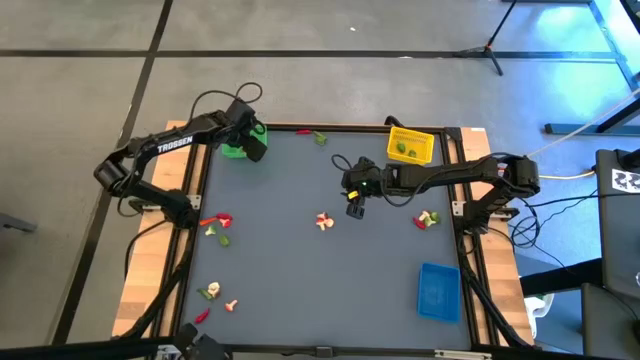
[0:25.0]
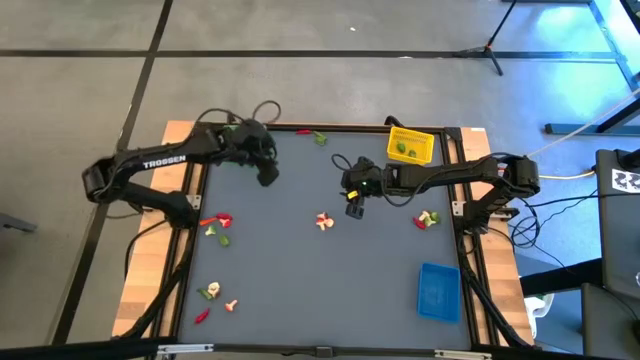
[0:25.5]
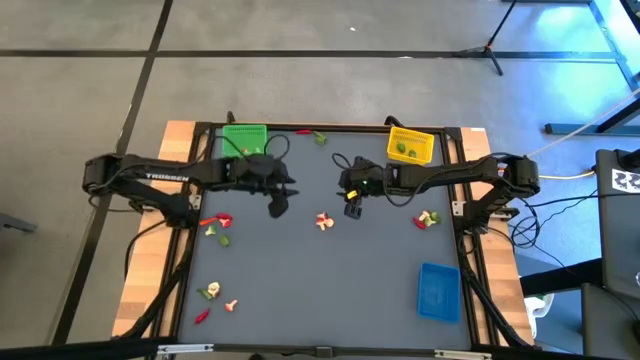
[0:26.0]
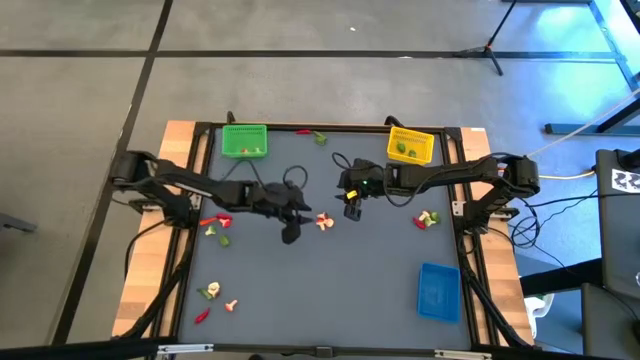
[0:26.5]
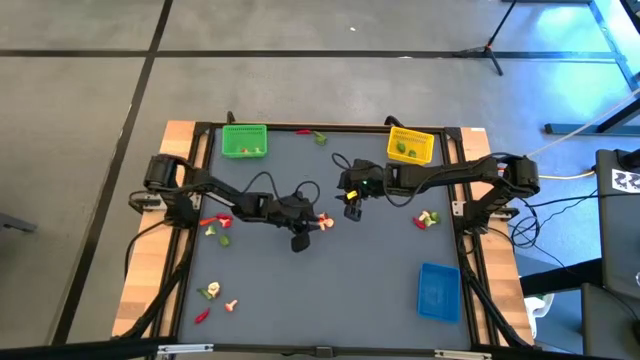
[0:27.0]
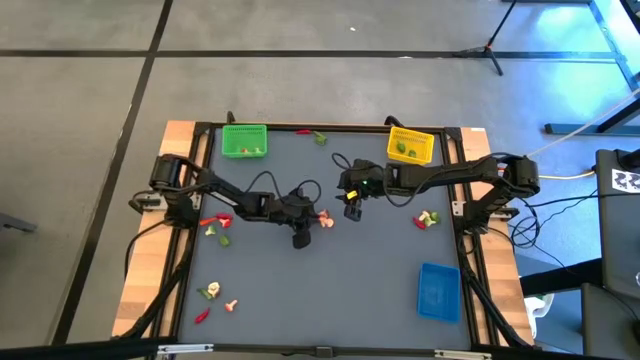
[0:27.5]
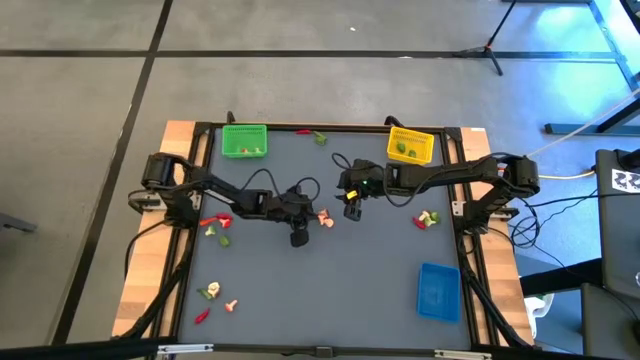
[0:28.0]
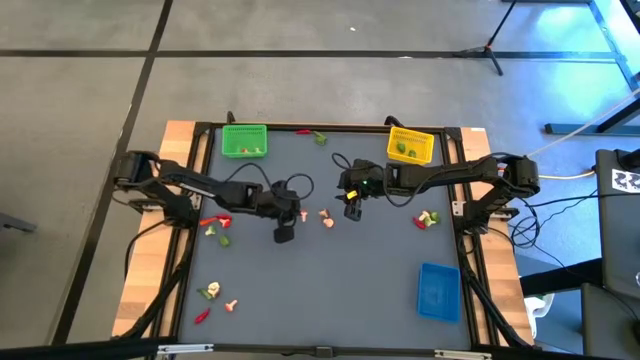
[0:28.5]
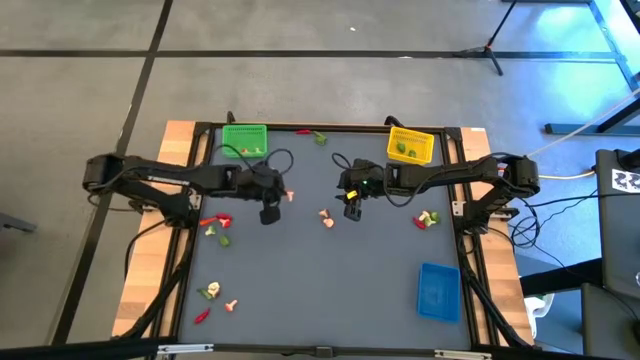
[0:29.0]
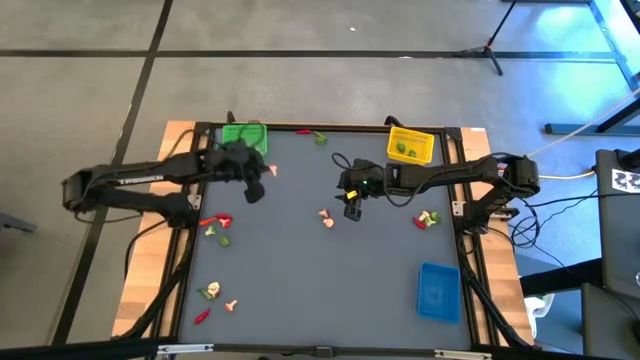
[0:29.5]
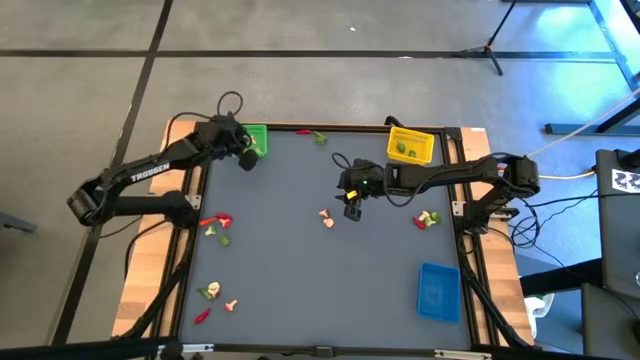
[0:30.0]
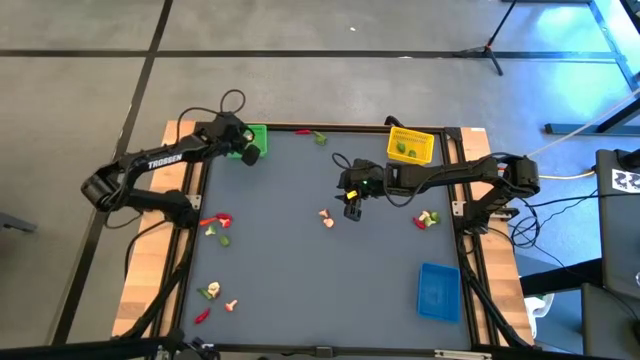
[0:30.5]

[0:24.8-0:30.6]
Task: Sort produce into baskets
Put the red mushroom into the green bin

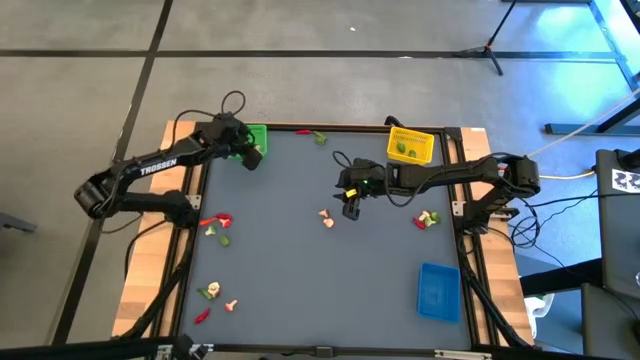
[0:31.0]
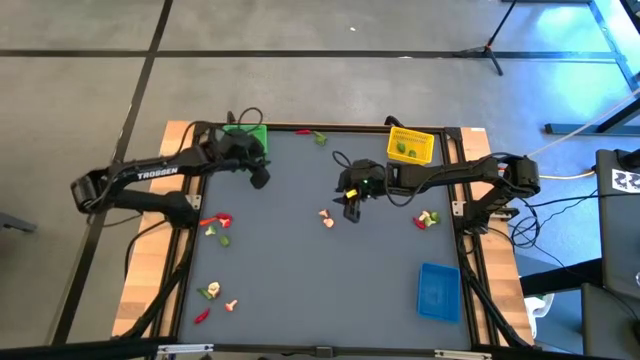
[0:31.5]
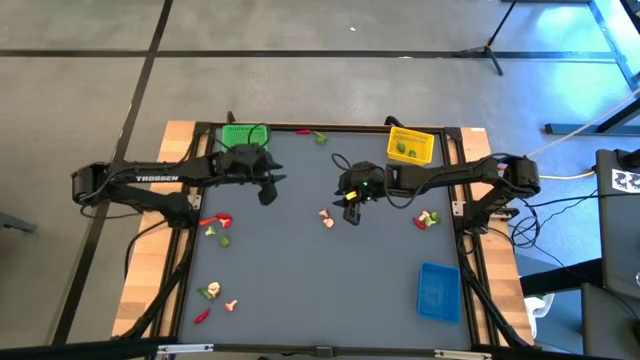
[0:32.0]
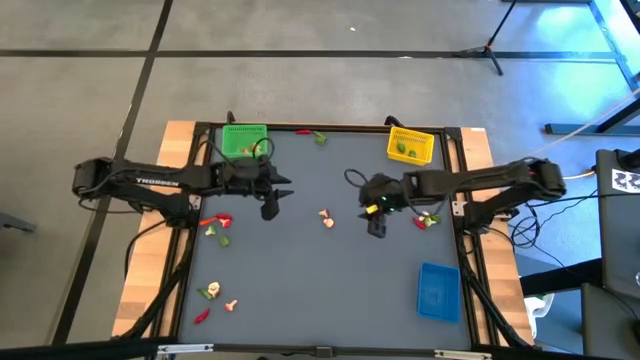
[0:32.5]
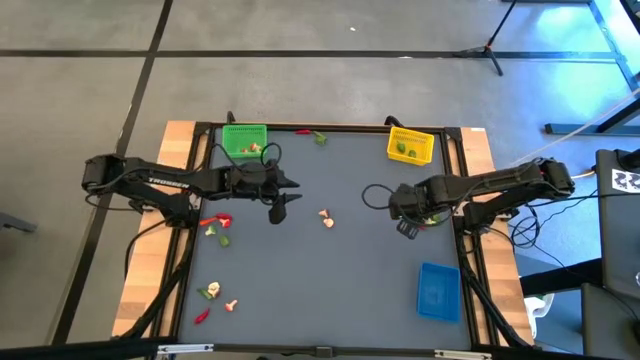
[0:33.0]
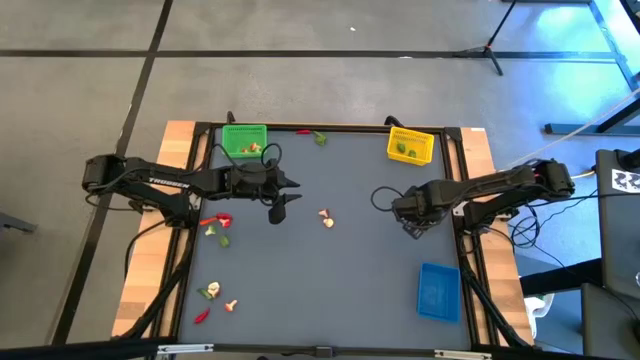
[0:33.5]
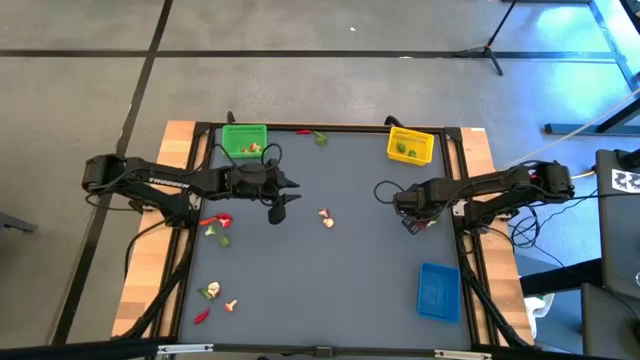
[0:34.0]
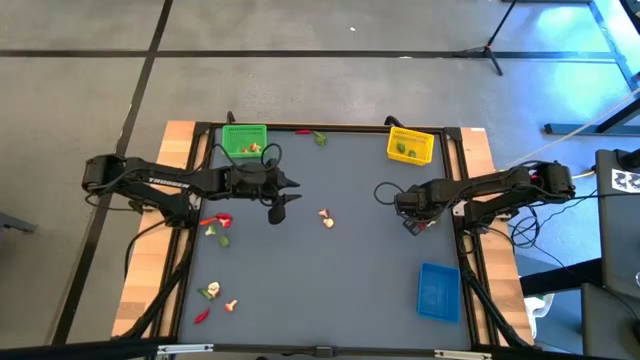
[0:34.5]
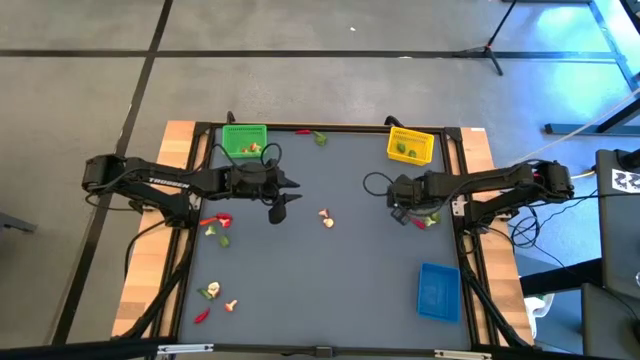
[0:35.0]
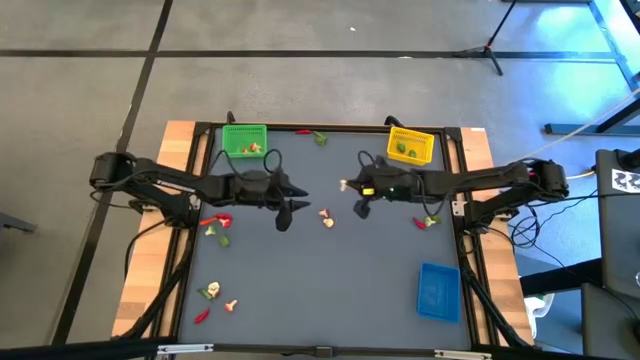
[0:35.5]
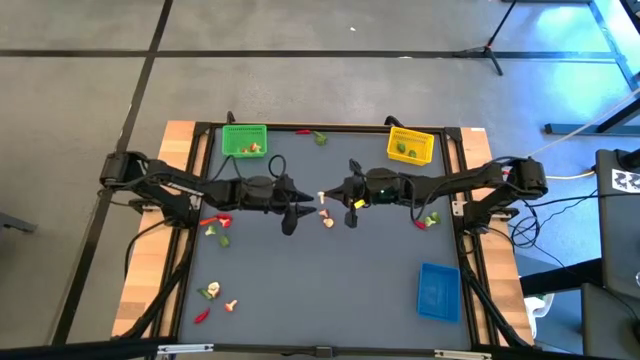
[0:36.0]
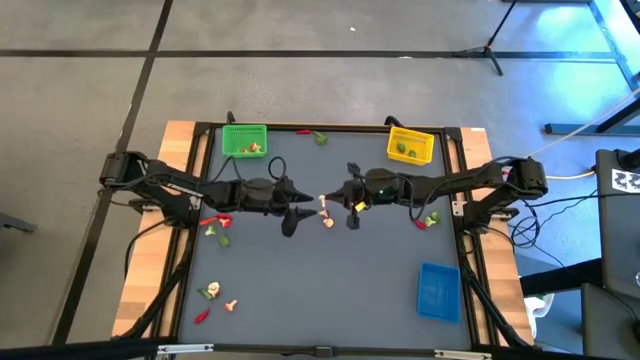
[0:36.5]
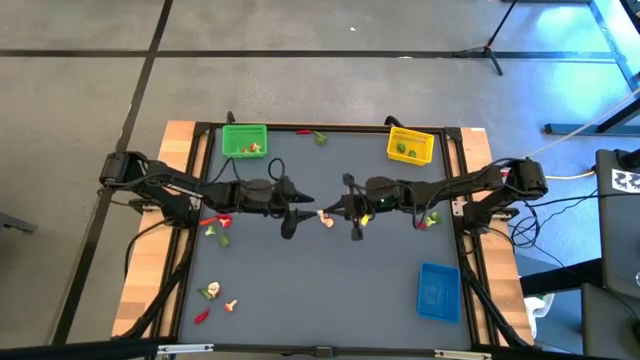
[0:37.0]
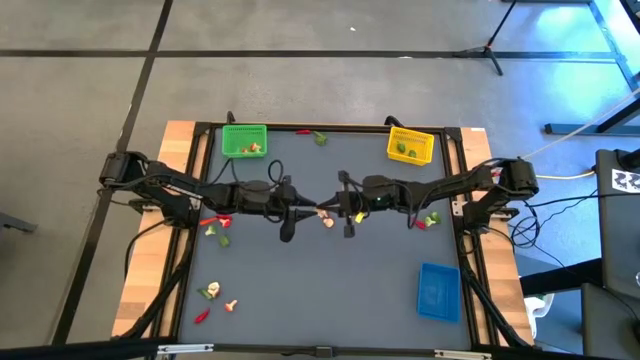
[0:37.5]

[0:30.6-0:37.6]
Put the brown mushroom into the green bin

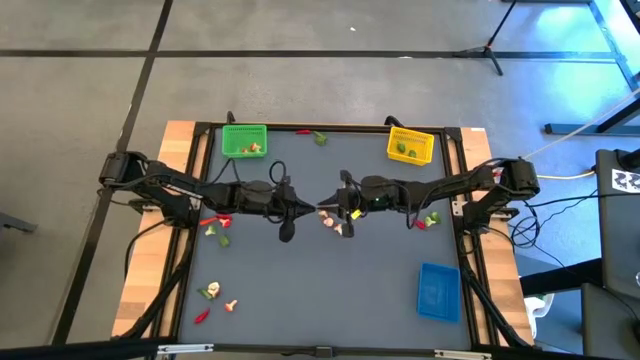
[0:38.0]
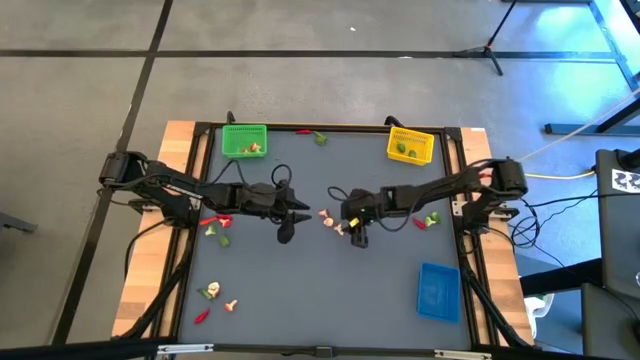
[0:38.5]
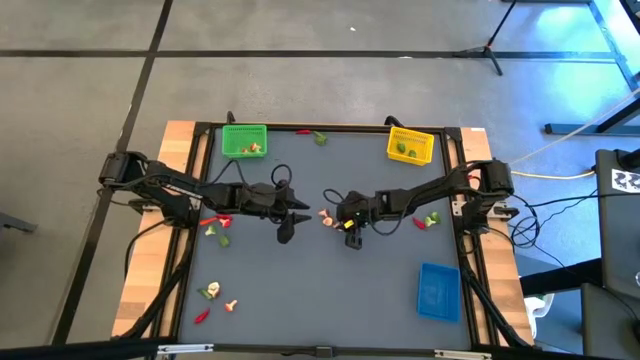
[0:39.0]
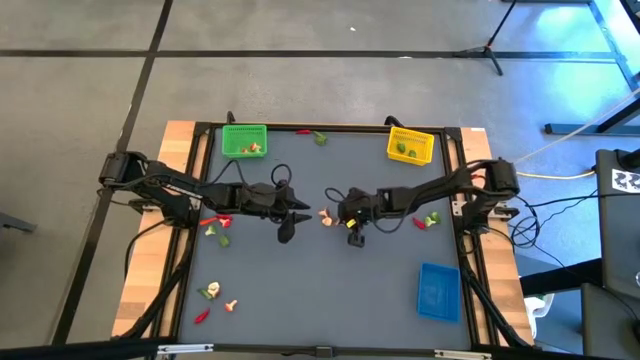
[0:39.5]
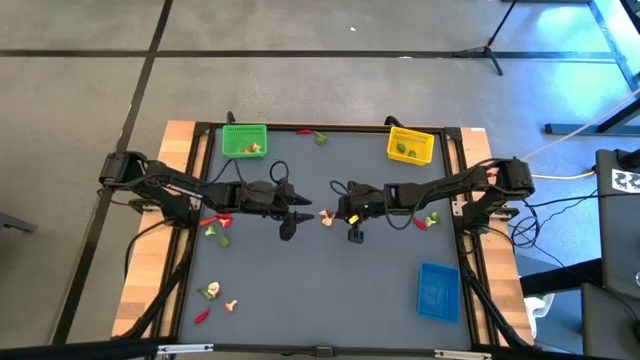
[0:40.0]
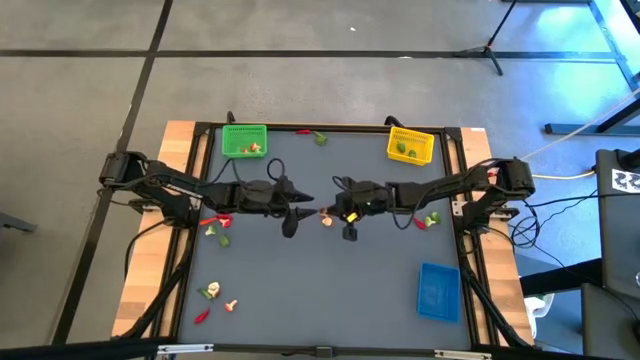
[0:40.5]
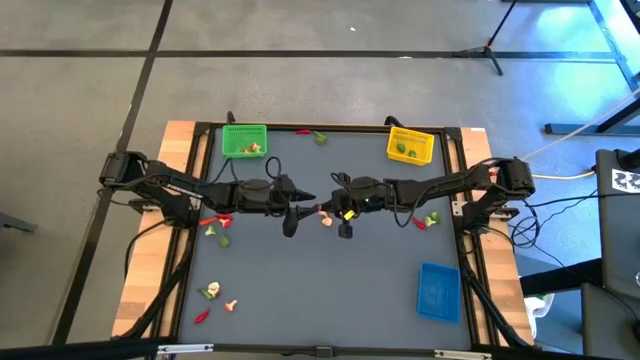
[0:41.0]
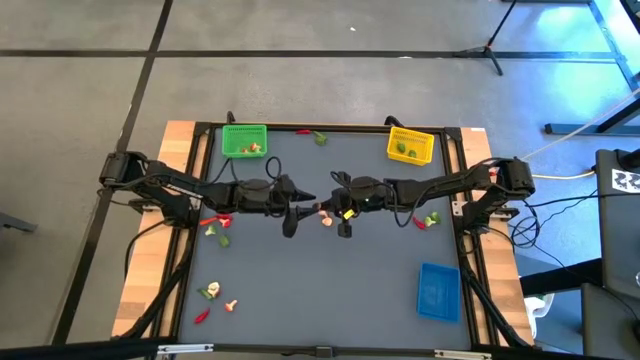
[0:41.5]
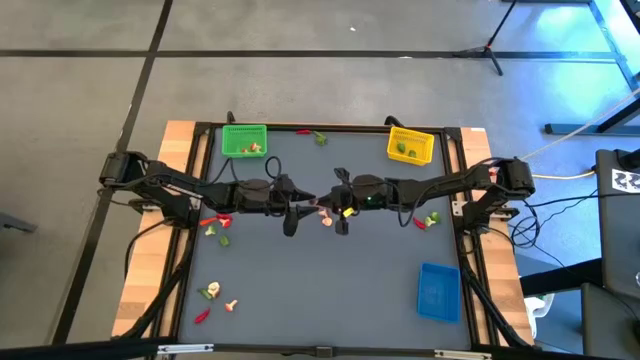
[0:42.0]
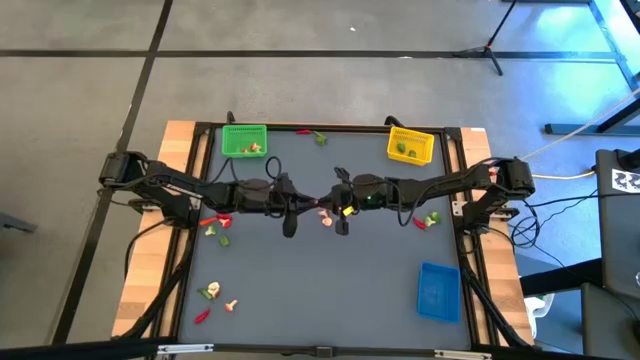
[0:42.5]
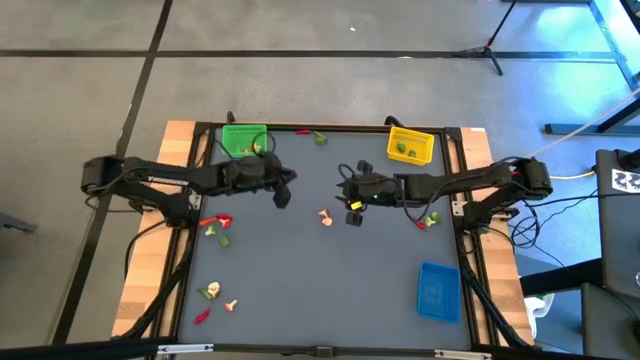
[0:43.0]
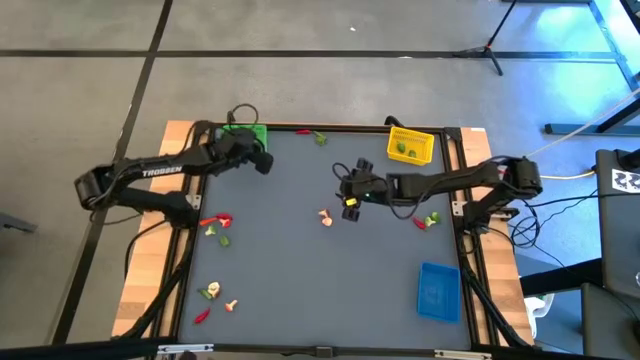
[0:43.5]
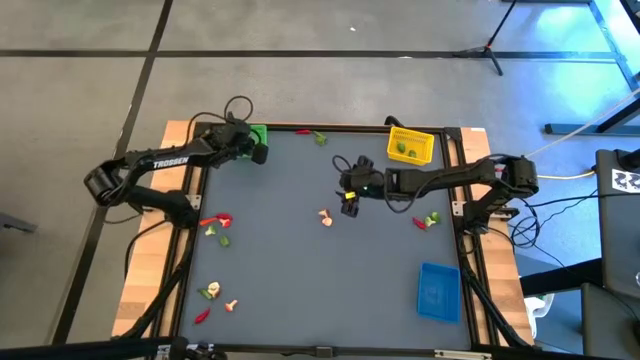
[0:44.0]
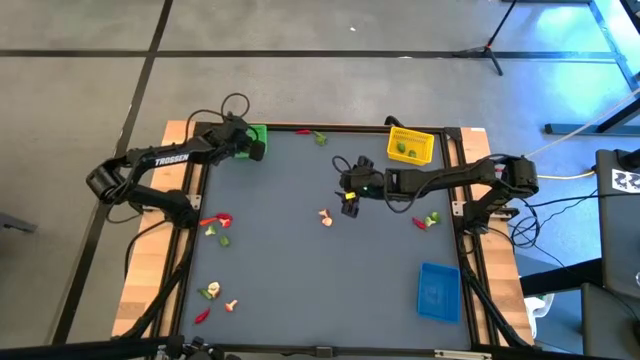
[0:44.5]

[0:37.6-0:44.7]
Put the brown mushroom into the green bin

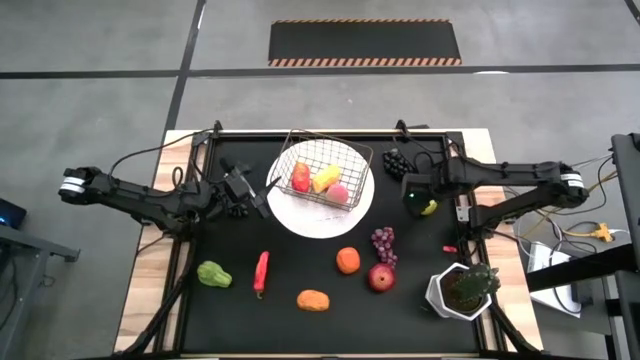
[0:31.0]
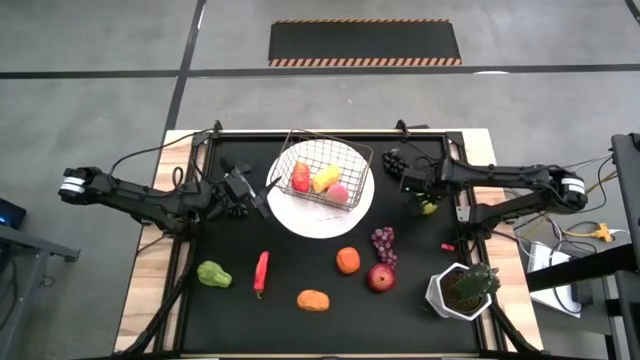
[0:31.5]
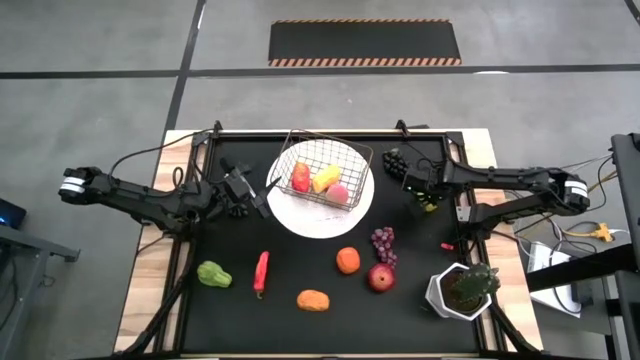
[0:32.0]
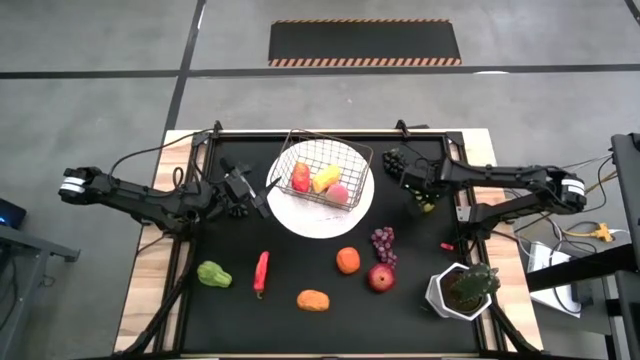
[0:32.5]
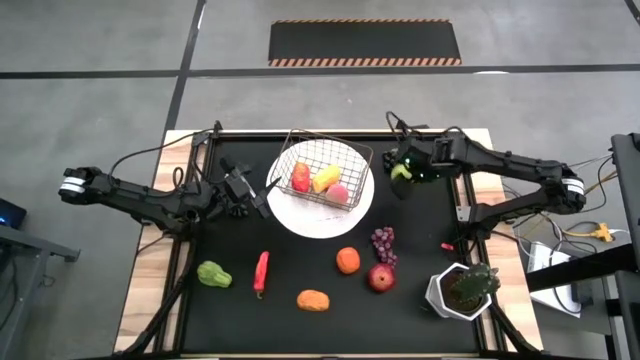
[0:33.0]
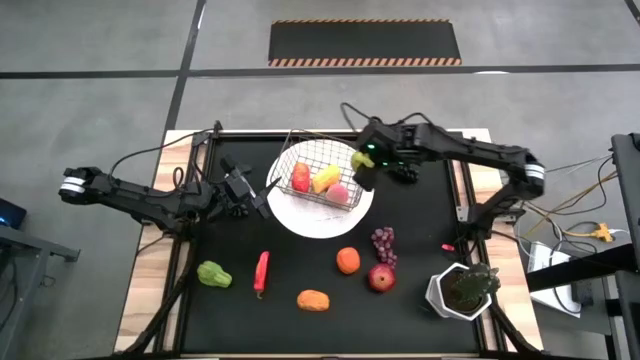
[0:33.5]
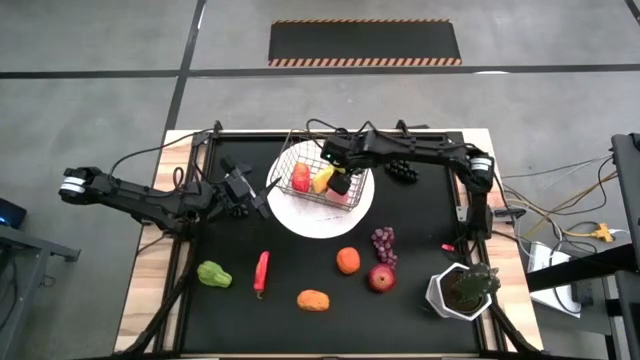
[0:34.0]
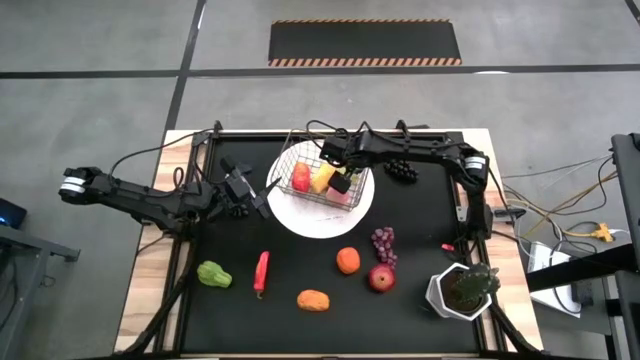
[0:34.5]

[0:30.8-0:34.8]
Task: Build produce basket
Put the green apple into the silver basket
